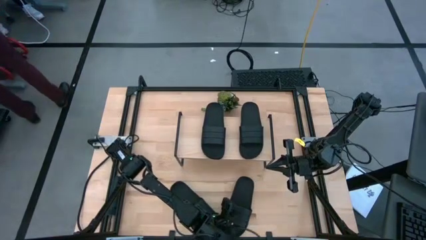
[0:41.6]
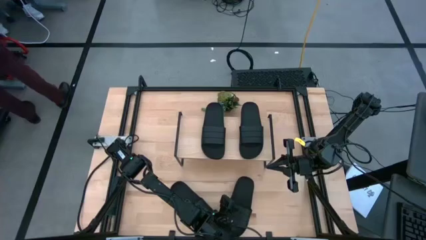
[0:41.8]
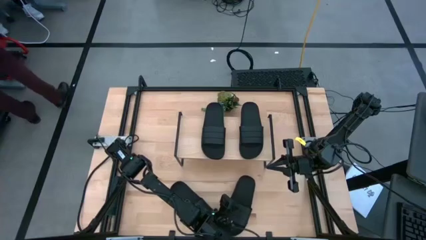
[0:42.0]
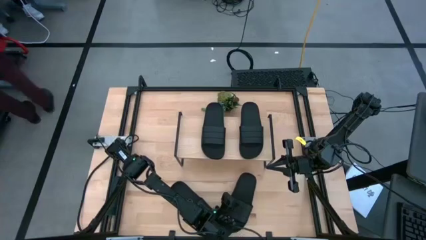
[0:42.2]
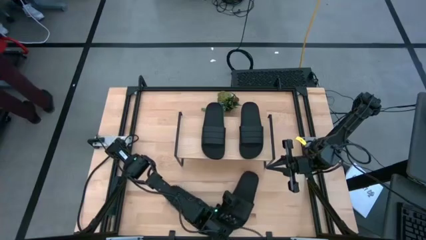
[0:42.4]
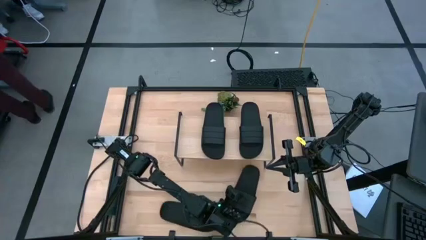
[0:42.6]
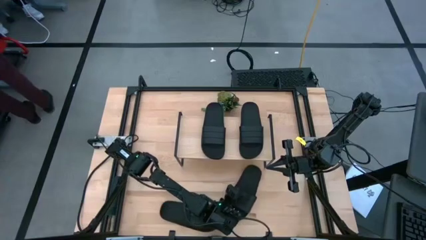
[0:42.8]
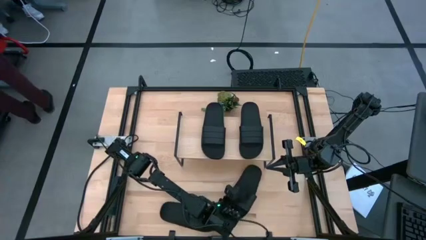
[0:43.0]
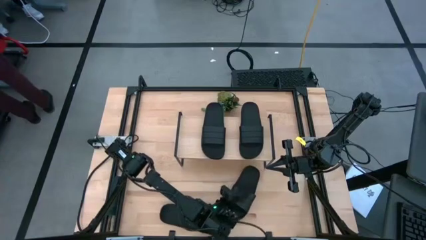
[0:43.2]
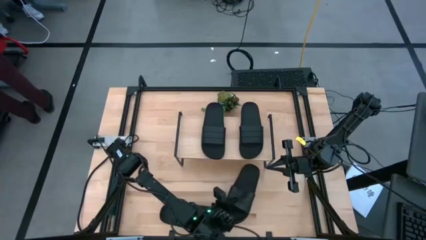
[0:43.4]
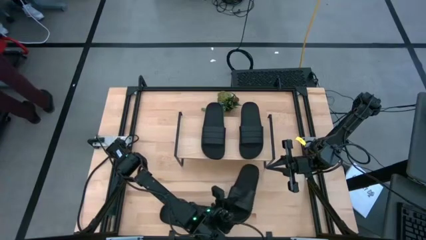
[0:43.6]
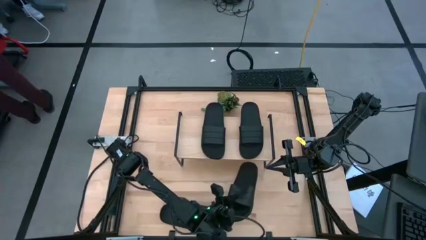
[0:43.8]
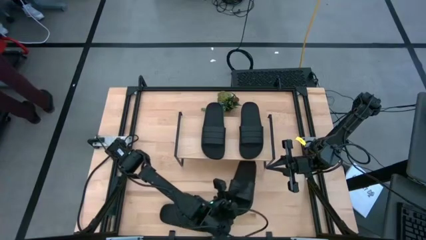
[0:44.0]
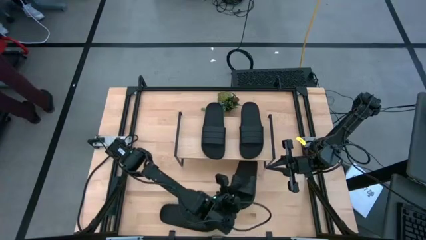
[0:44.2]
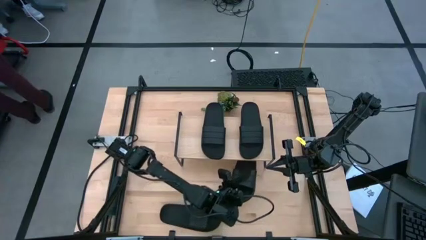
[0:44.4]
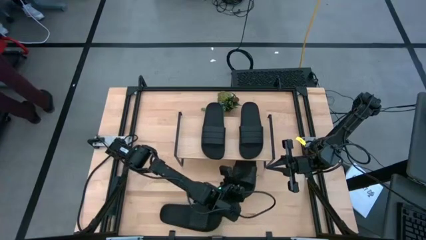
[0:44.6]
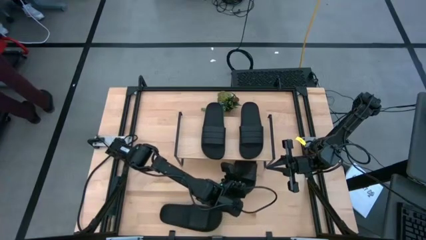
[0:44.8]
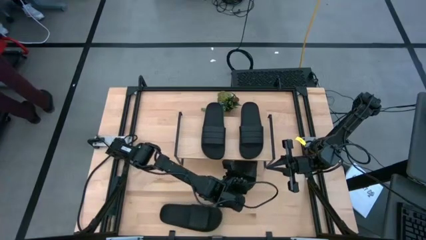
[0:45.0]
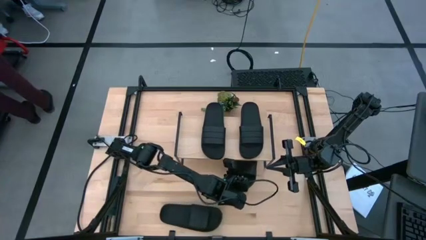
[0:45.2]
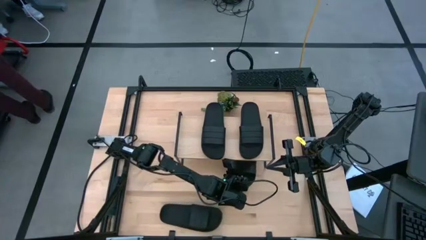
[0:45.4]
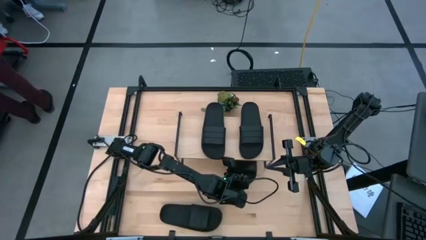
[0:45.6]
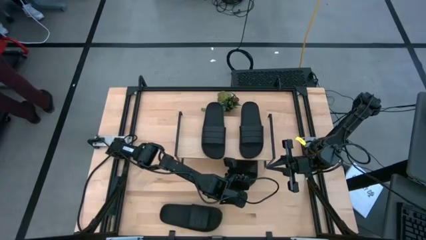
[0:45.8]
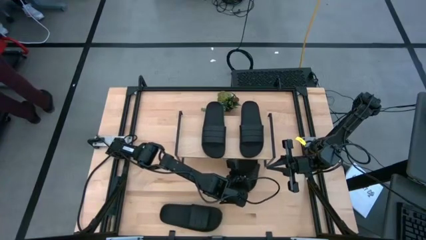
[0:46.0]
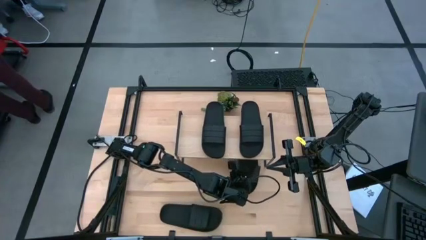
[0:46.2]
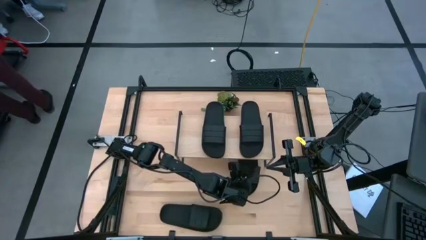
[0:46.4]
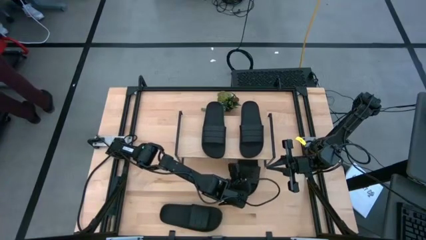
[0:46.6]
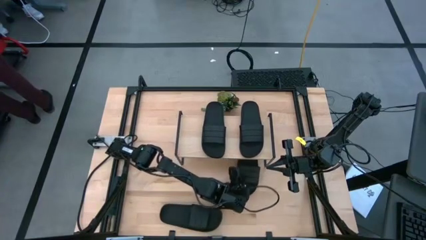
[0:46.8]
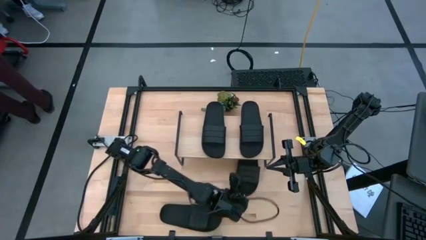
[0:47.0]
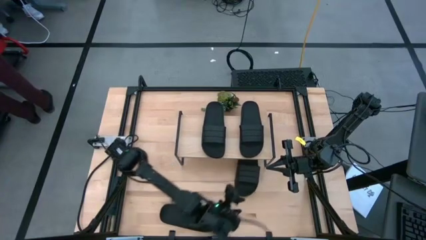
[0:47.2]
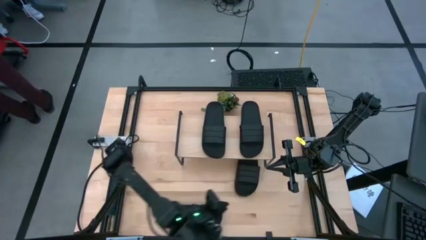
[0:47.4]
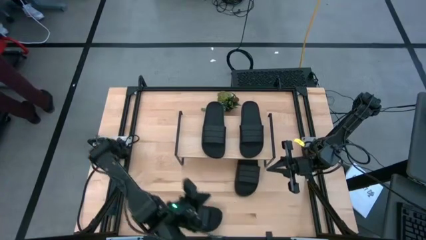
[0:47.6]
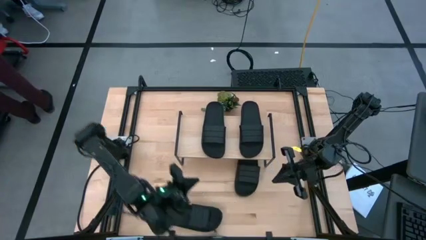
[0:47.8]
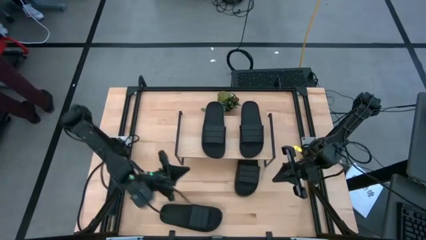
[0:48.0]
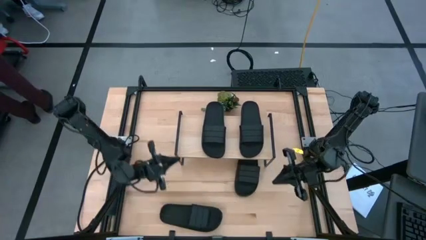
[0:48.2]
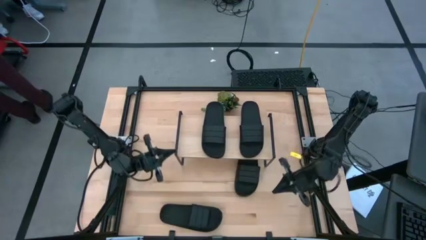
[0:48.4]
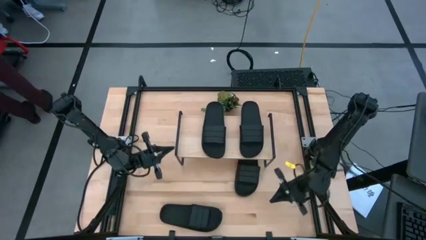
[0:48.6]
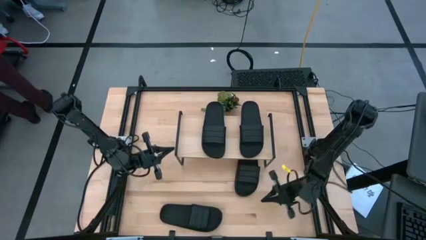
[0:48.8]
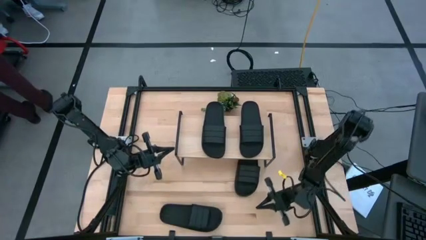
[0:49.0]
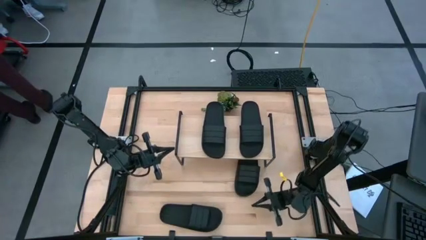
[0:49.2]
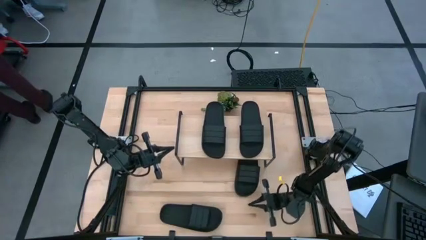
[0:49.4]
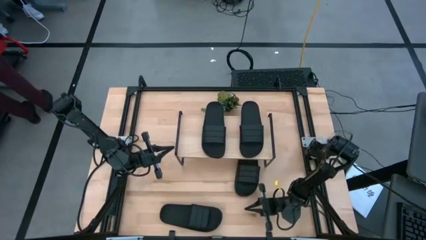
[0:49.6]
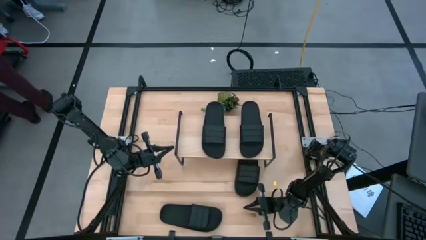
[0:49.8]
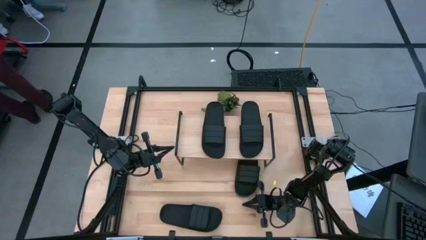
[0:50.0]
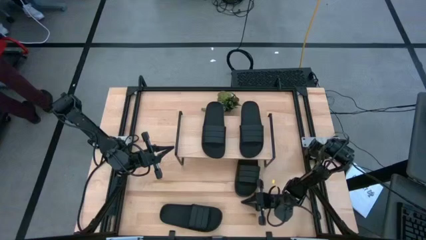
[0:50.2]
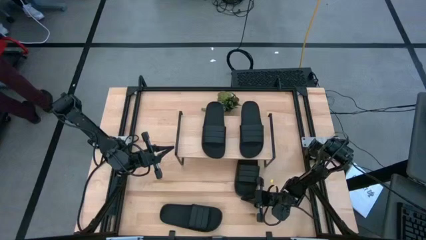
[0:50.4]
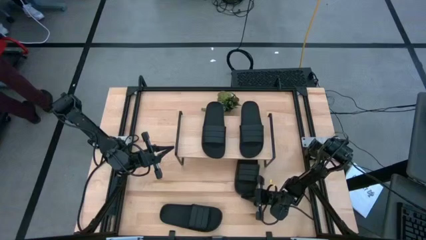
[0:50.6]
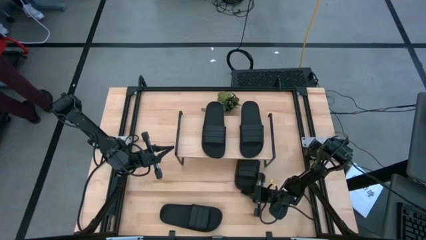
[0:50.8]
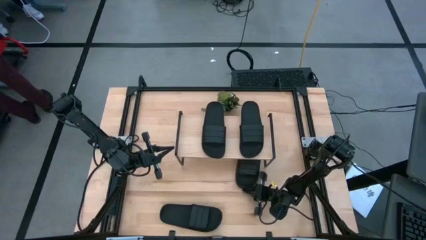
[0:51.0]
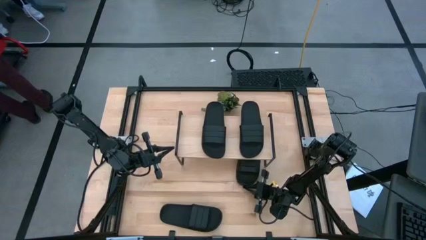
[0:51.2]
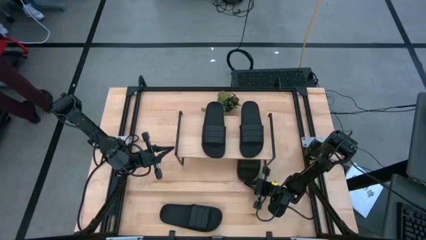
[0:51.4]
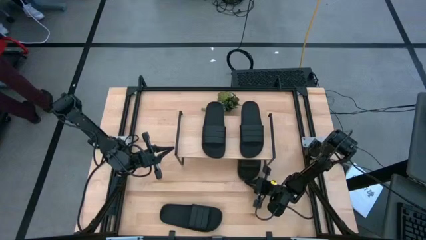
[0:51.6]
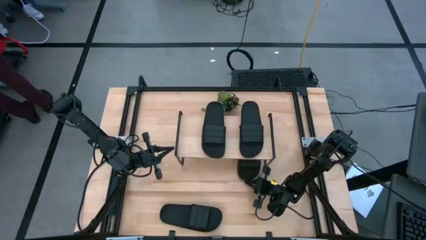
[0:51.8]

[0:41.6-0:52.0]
Task: Pick and place slides into the shelf
Put the black slipper under the shelf
